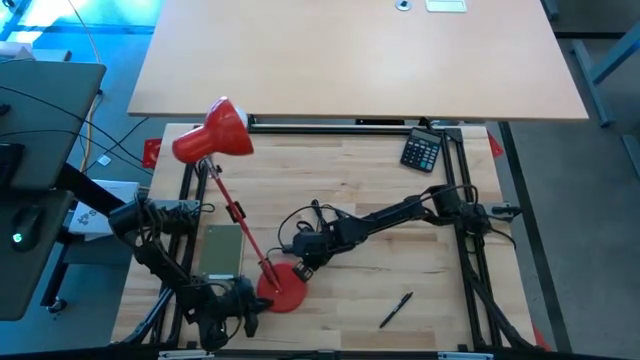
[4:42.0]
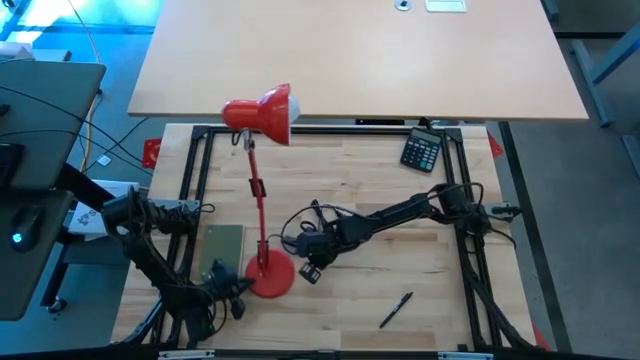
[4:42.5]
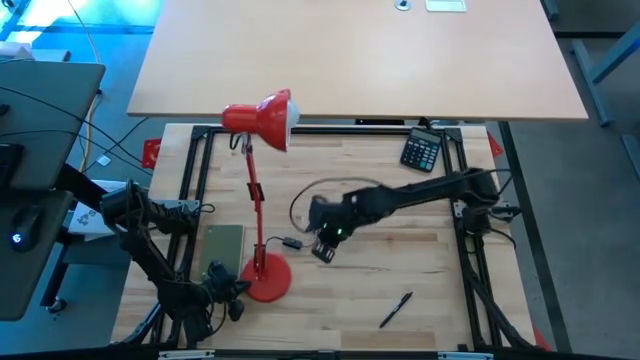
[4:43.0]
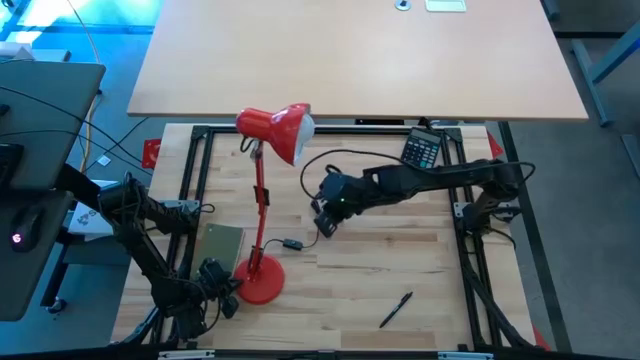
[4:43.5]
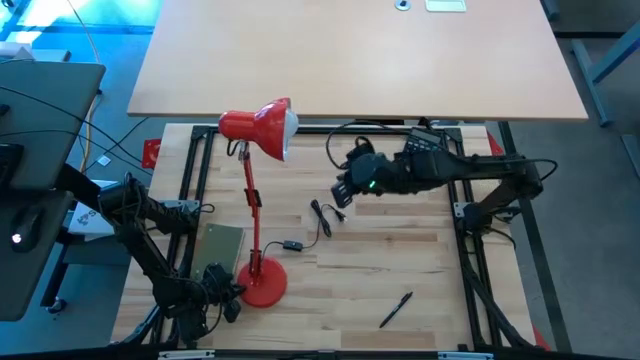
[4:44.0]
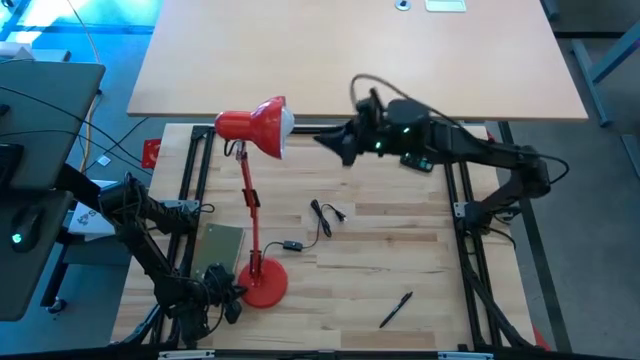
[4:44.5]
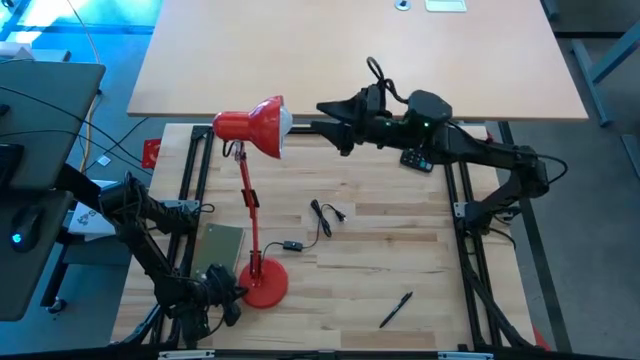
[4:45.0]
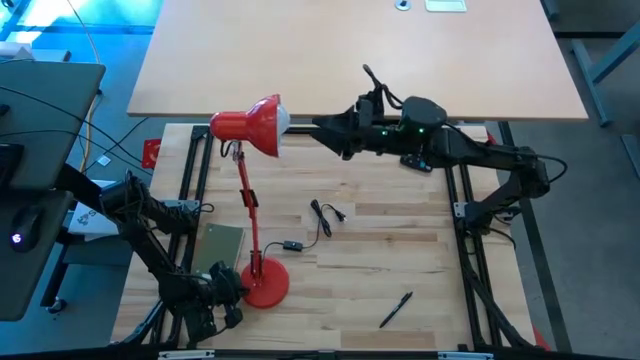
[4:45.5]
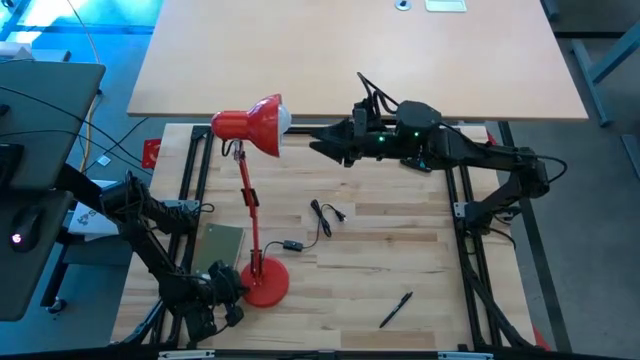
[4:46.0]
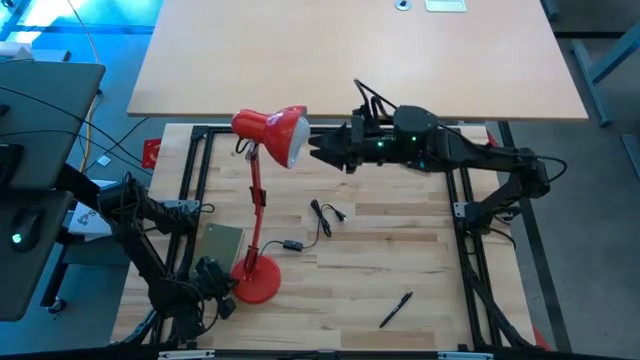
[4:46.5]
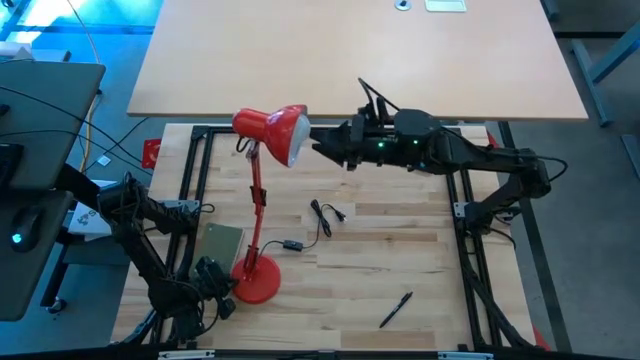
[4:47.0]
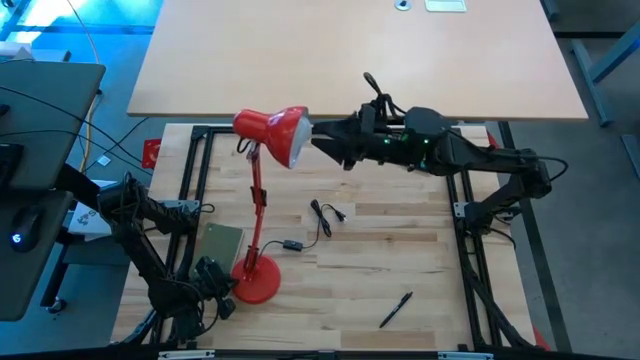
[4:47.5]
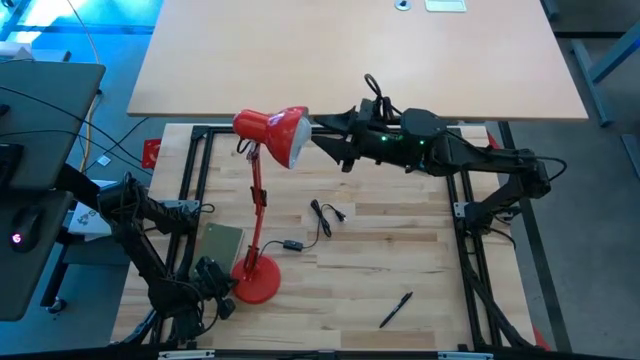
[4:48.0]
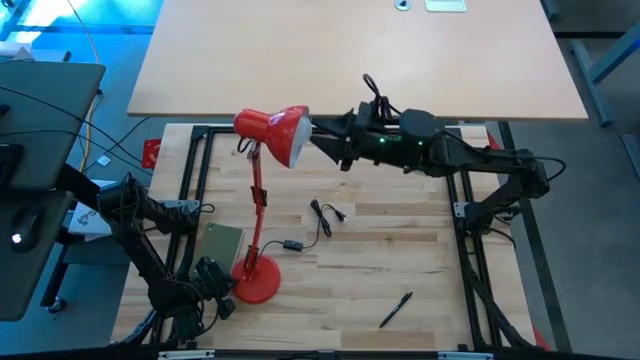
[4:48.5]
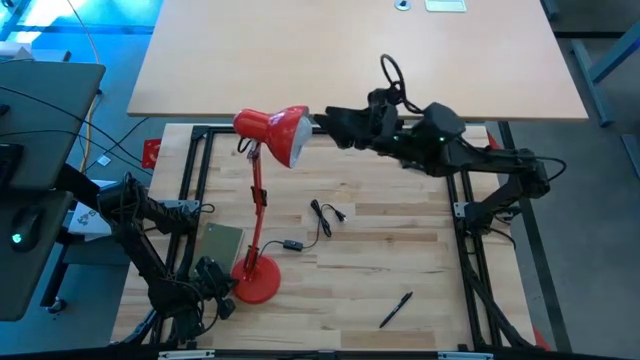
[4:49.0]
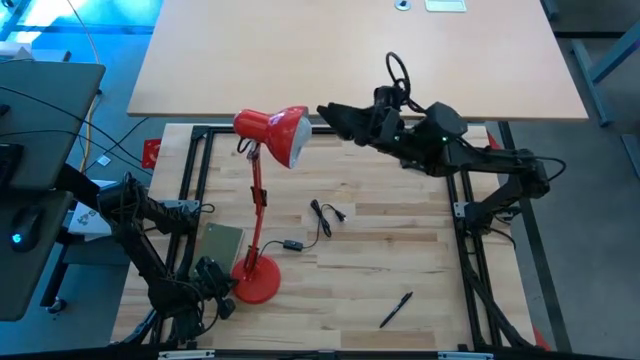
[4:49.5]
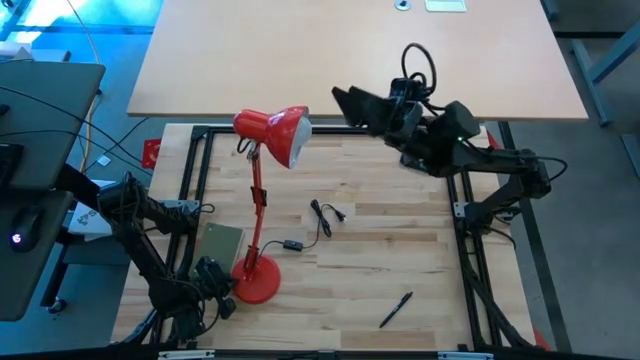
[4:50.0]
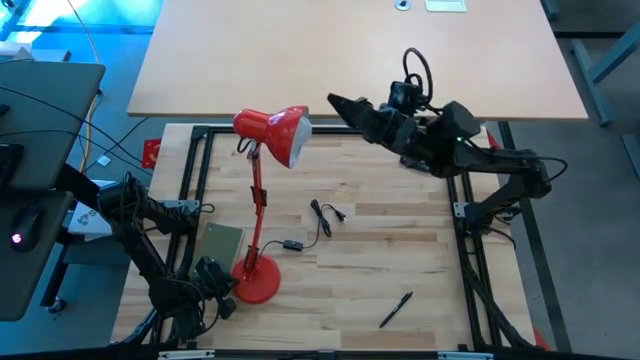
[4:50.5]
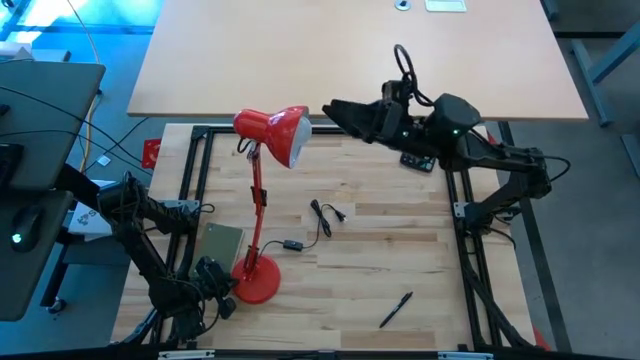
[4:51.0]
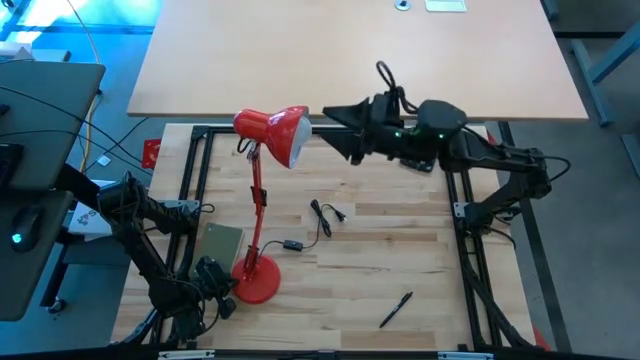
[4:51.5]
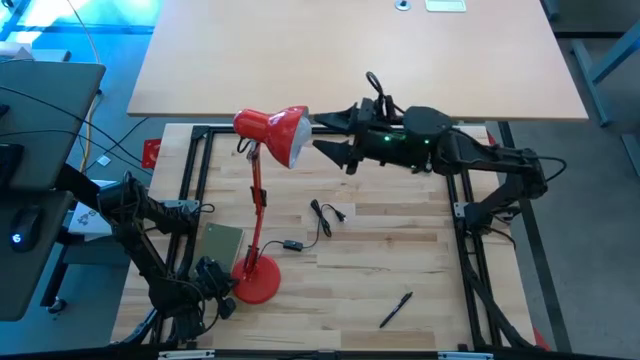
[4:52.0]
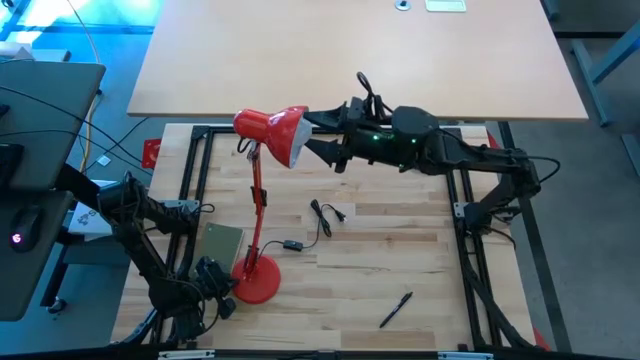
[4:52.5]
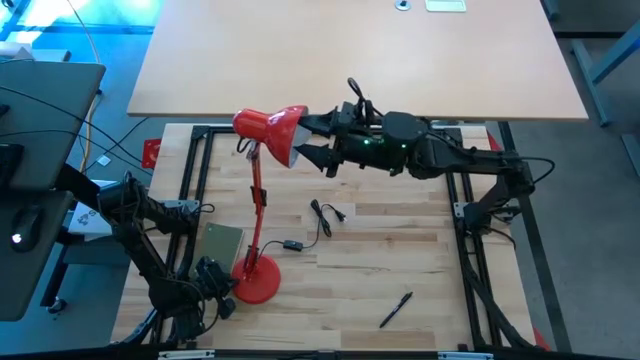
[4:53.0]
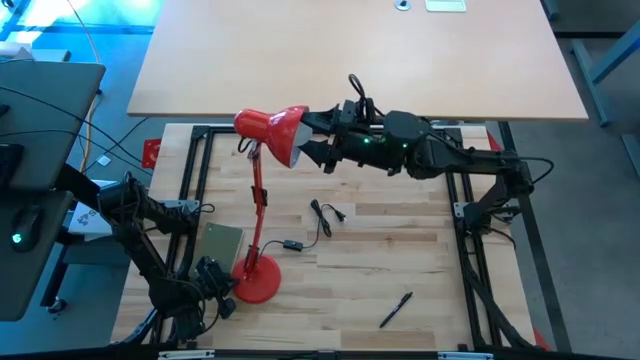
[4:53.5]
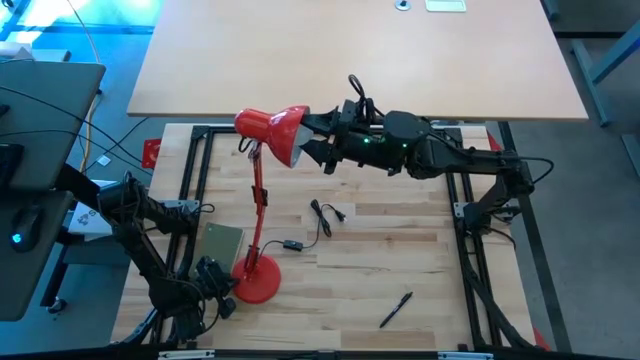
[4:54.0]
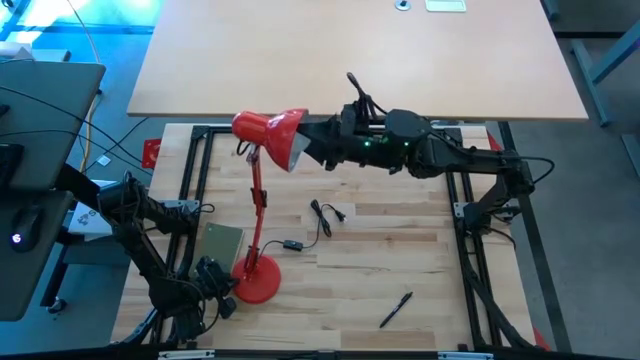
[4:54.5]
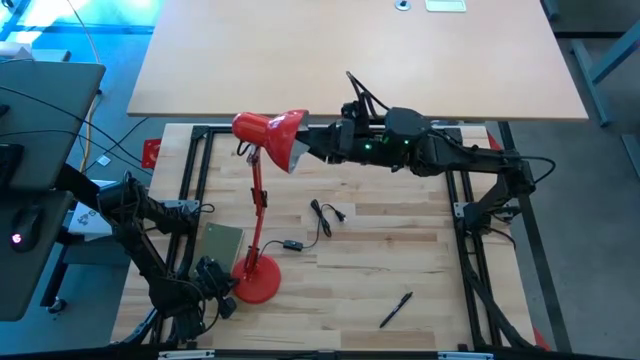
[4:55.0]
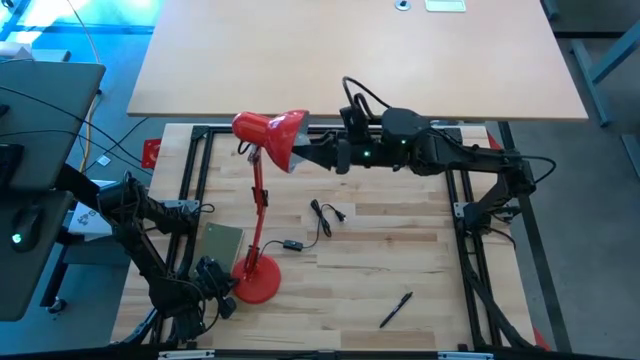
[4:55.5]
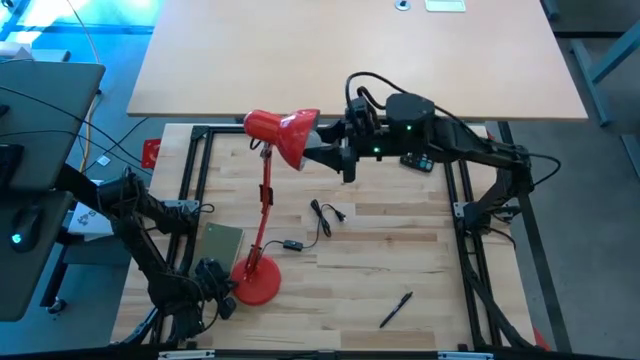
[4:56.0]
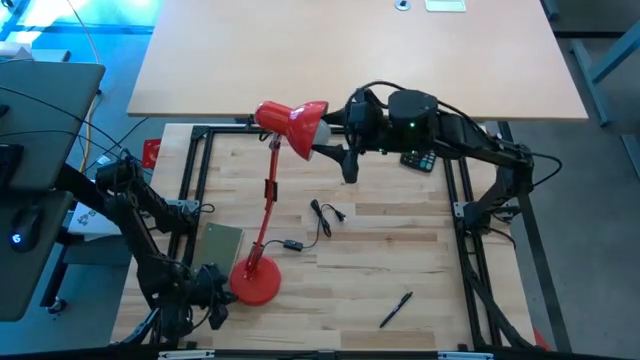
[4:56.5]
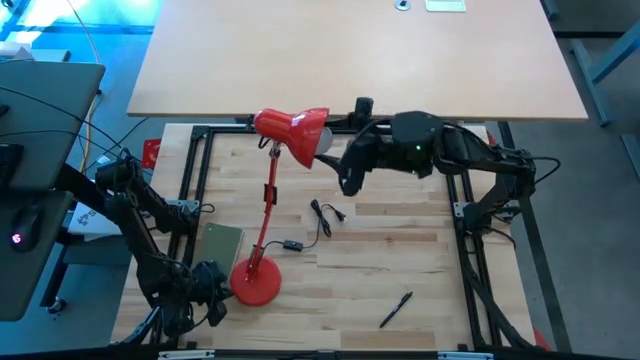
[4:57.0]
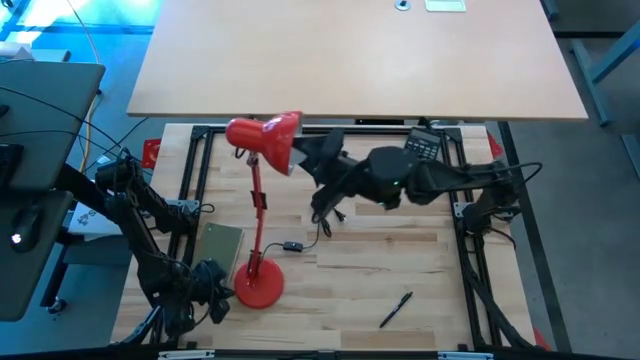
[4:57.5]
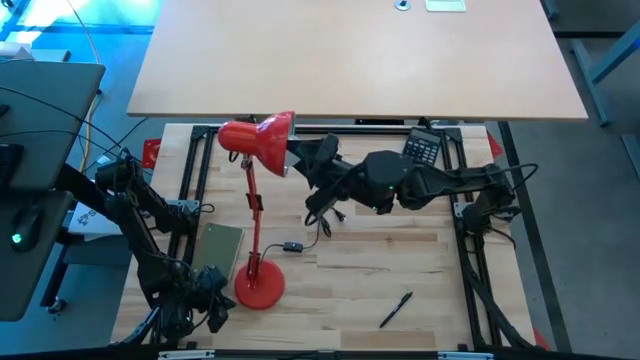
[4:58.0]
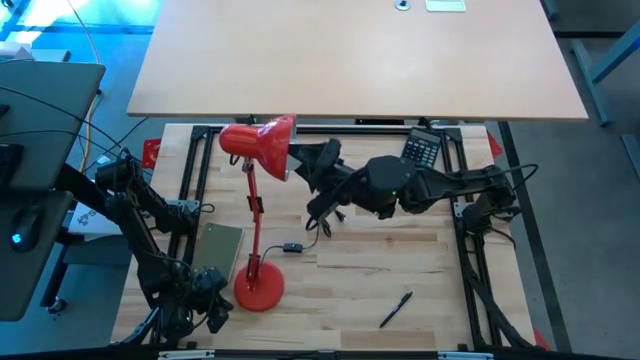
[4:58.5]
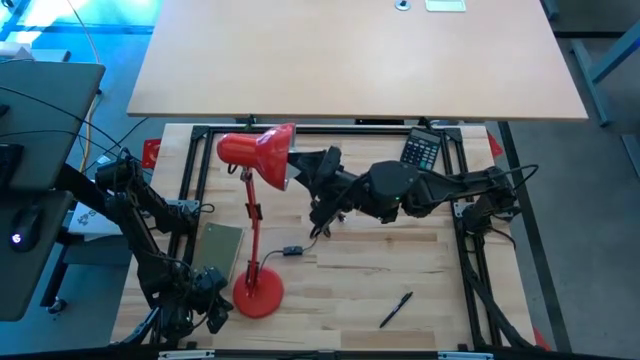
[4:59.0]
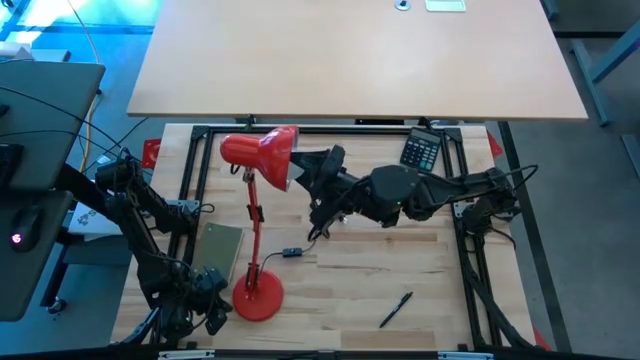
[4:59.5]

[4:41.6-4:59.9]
Task: Screw lightbulb
Remove the white lightbulb from the red lamp
